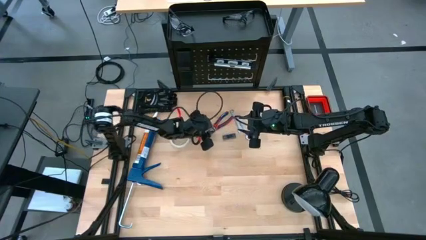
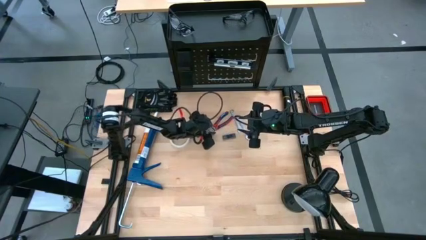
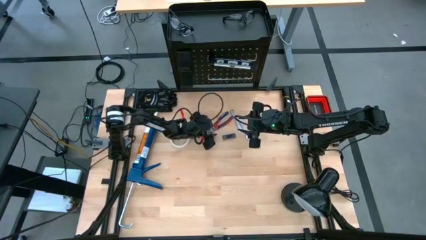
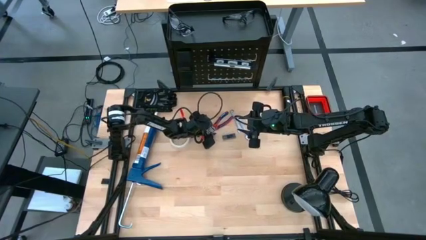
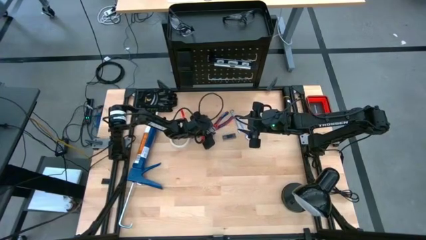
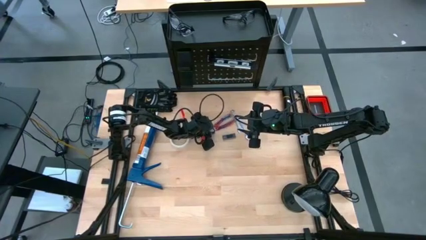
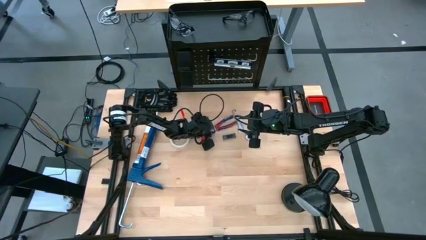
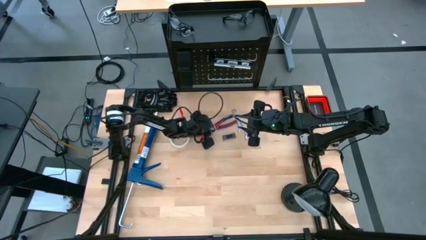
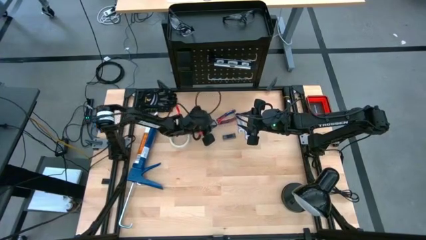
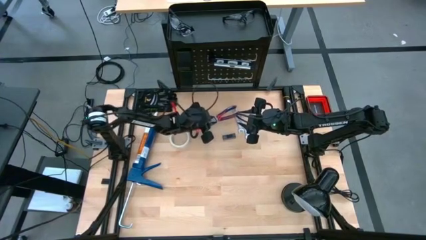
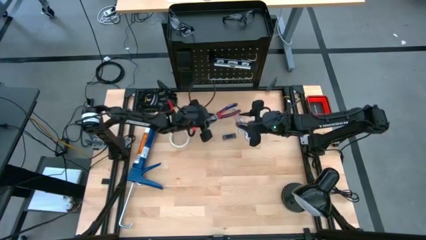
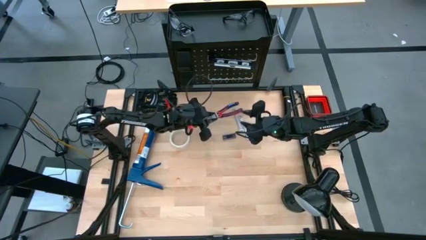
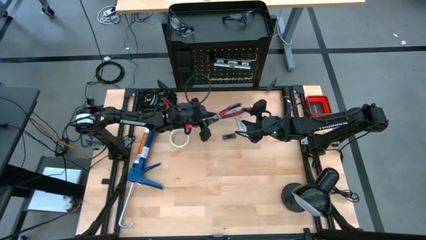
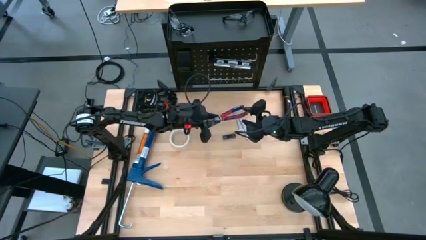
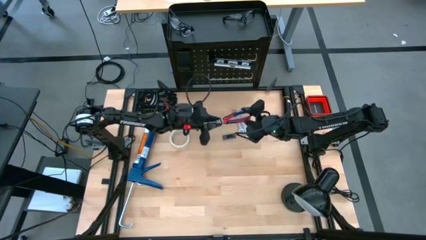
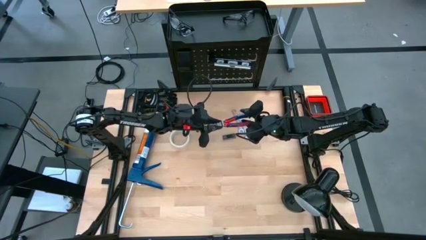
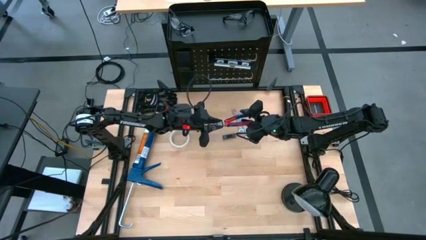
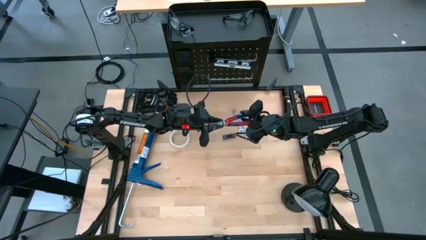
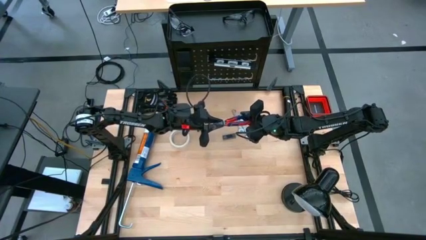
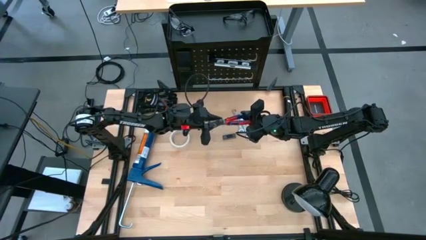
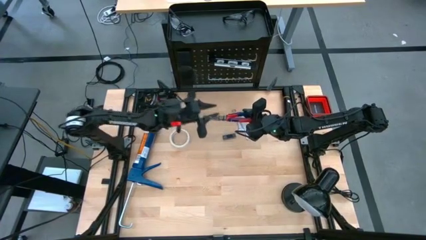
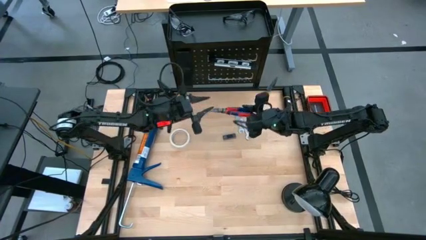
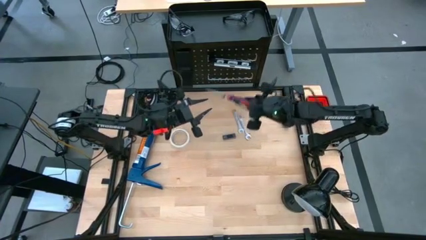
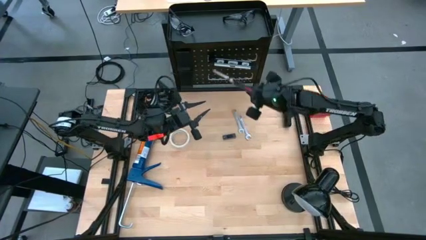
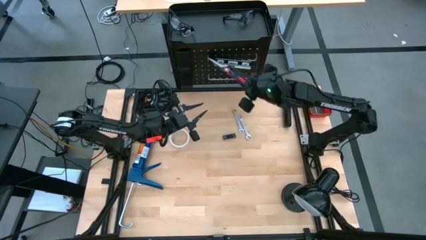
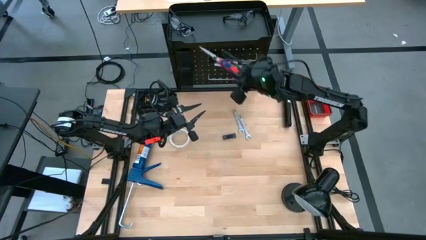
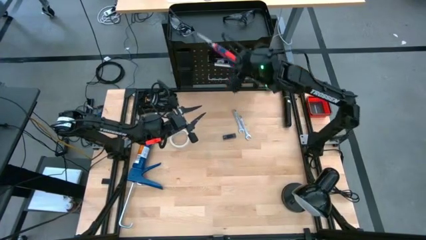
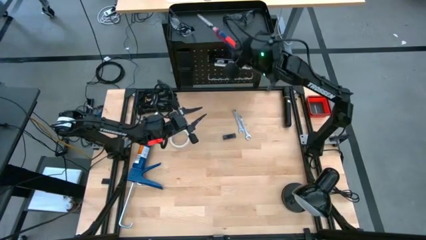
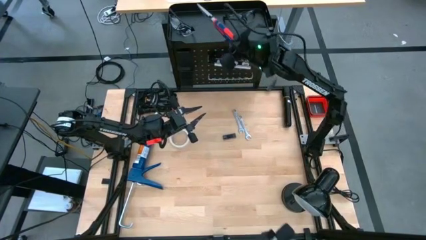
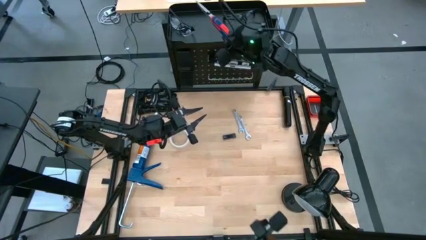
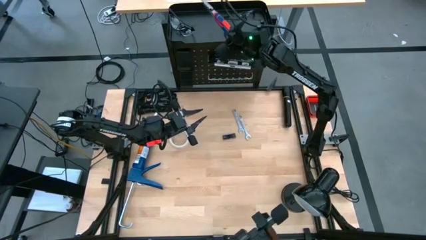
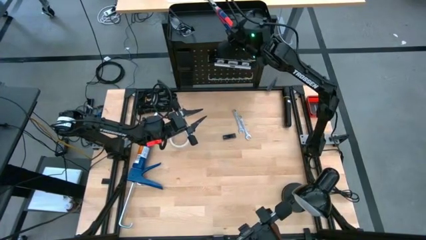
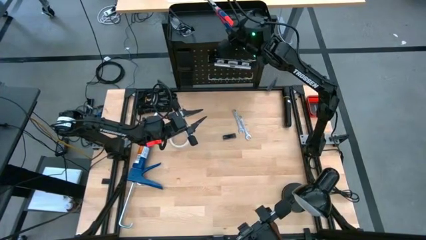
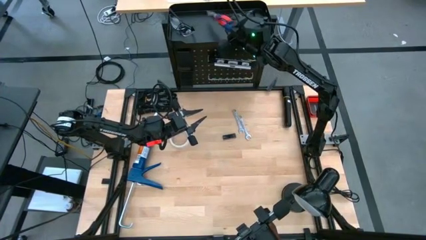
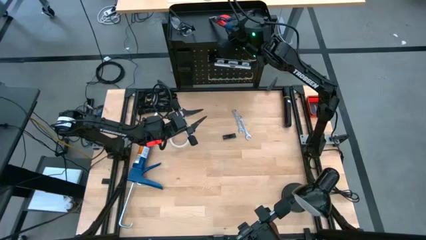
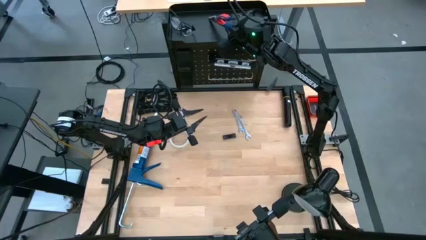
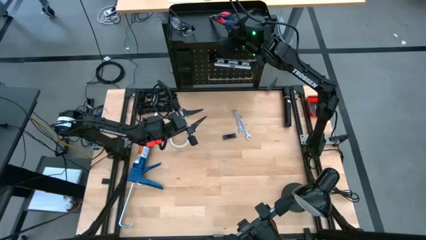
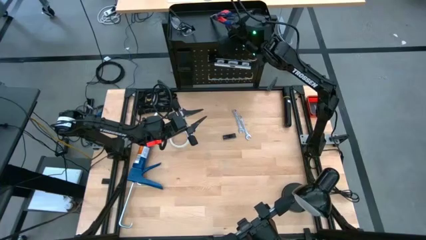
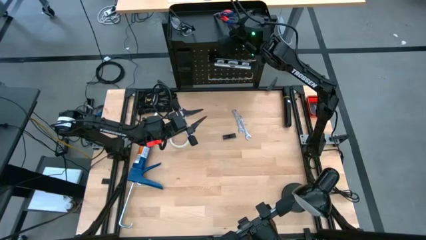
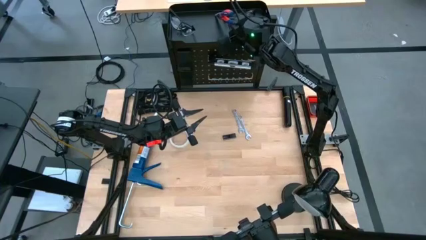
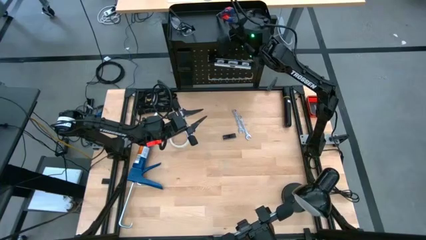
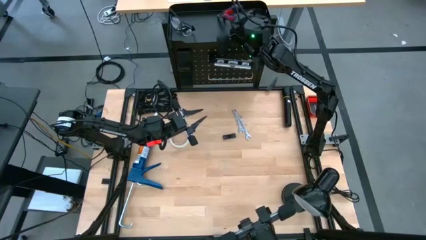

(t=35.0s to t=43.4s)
Task: Hang tools onto peg board
Put the pliers on the peg board bin

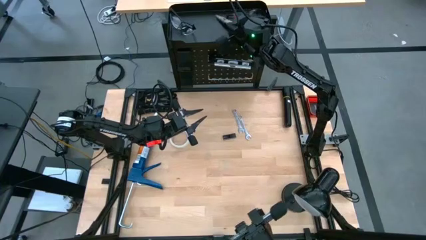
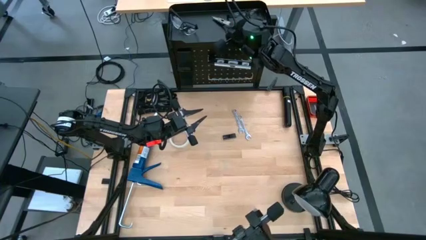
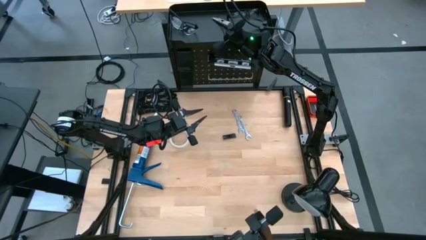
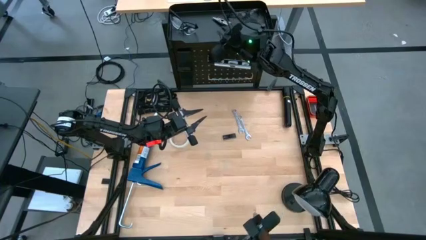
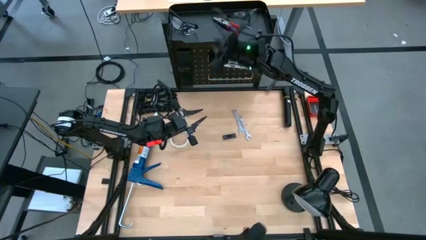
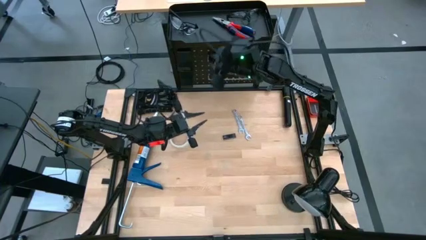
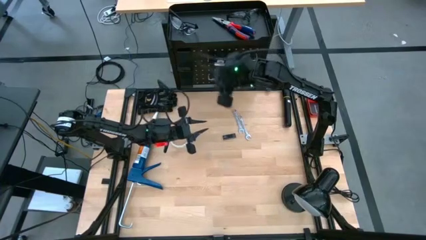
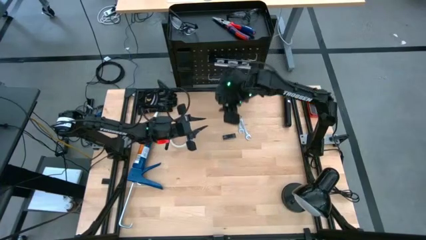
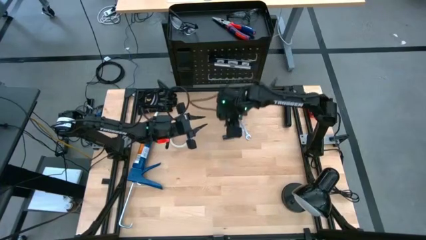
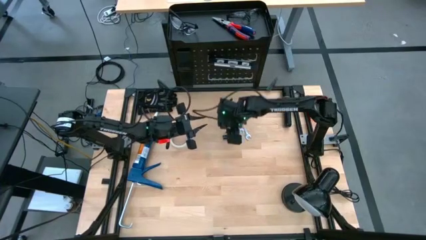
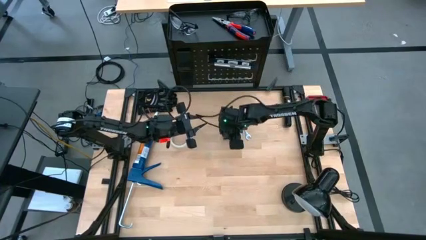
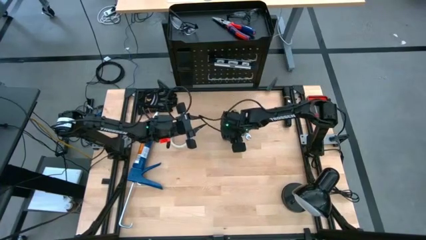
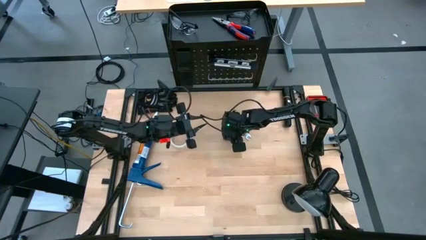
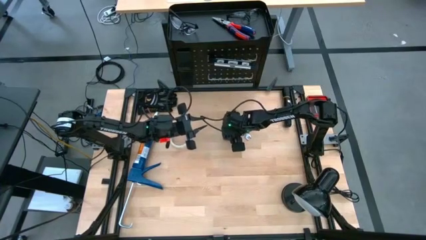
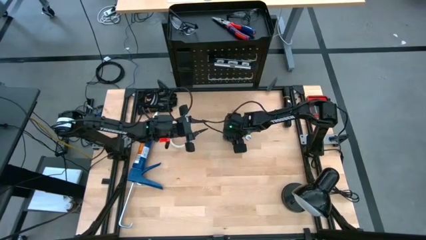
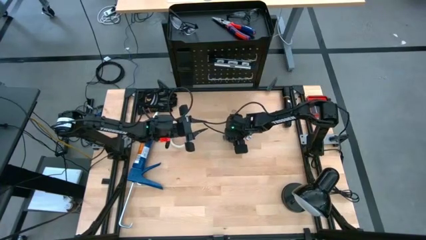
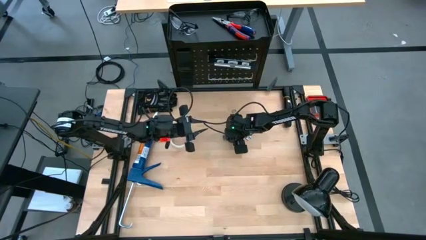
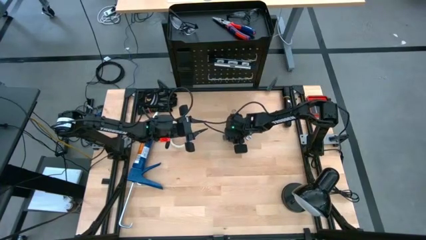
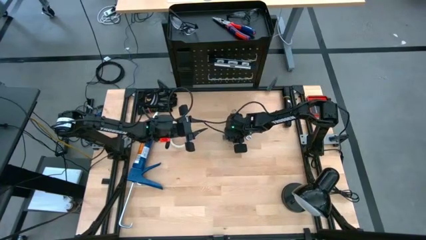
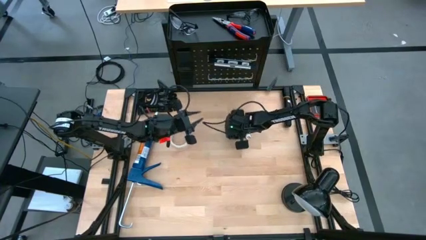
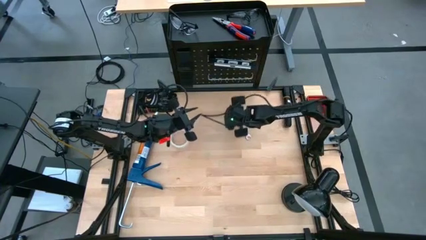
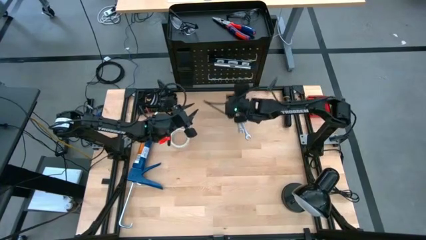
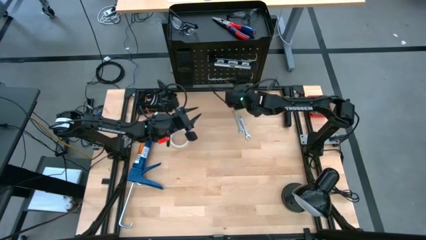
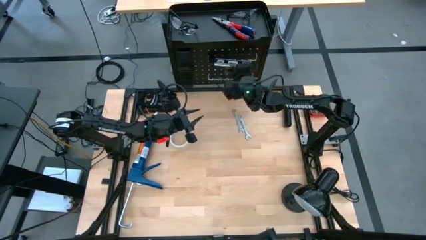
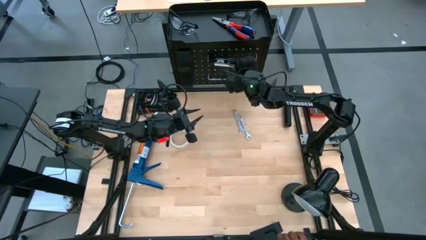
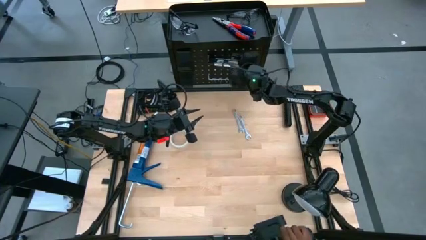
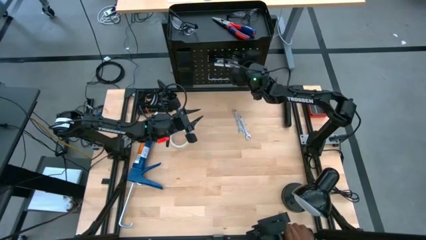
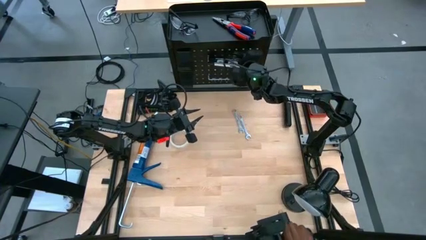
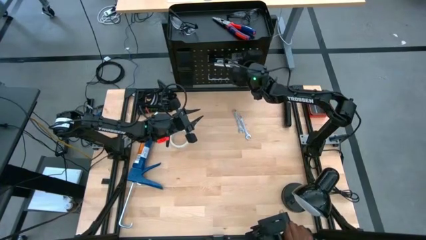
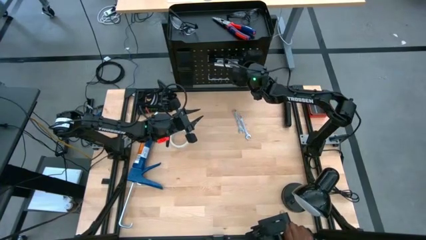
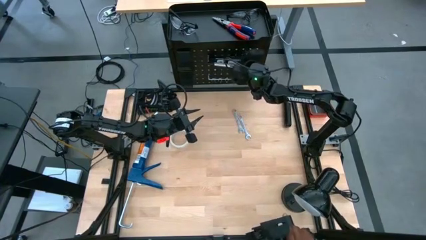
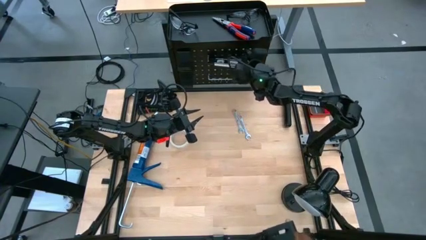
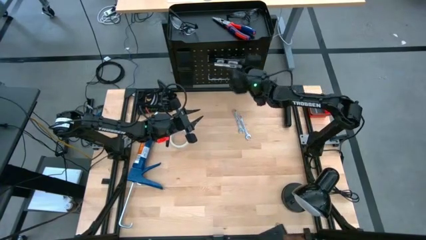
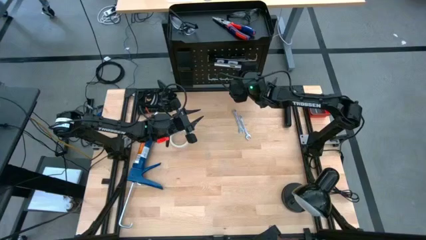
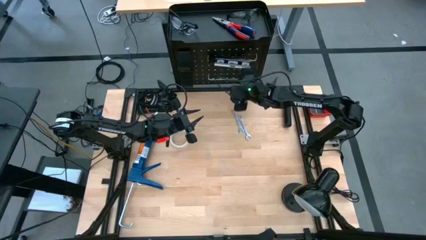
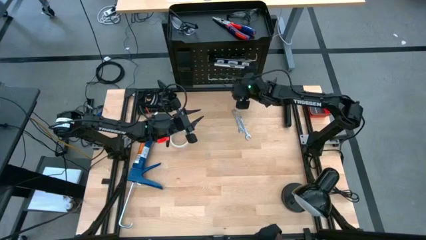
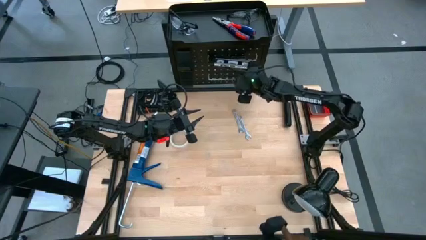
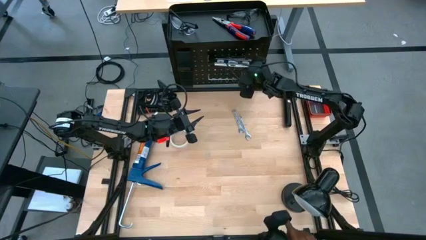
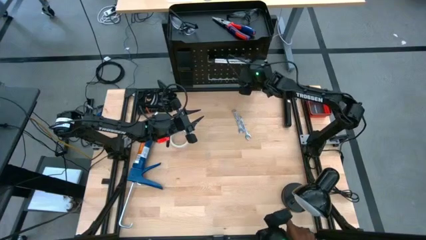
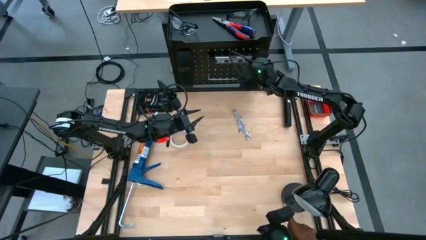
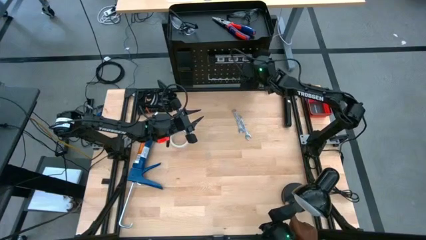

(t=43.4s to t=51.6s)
Hang the utility knife on the peg board
